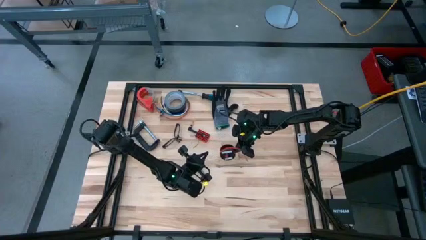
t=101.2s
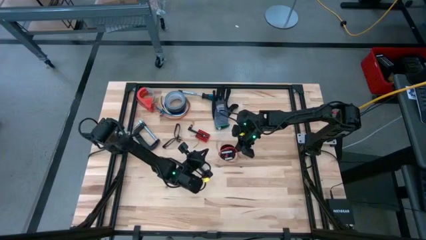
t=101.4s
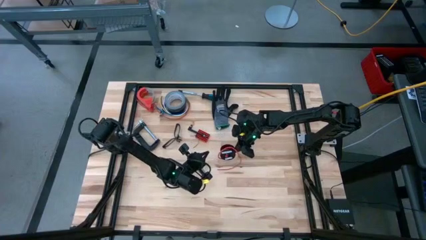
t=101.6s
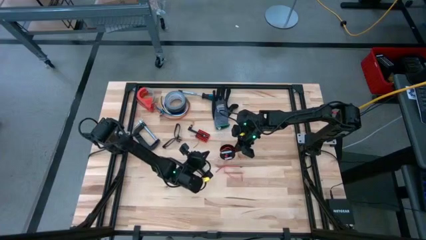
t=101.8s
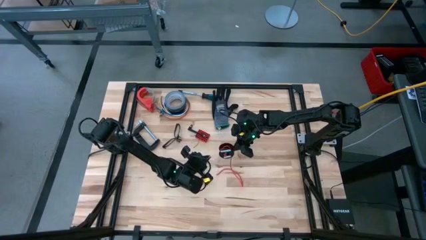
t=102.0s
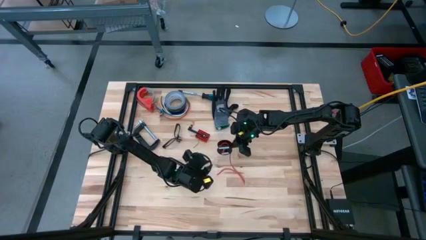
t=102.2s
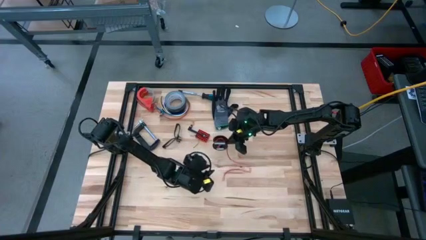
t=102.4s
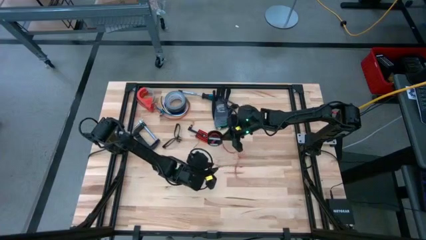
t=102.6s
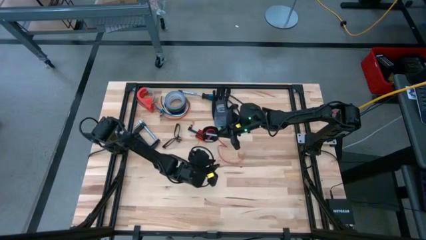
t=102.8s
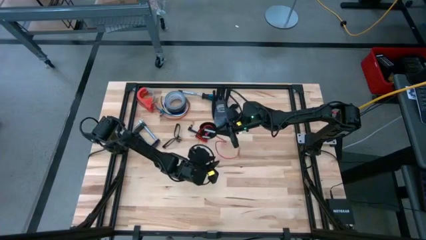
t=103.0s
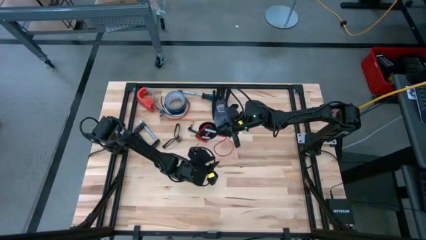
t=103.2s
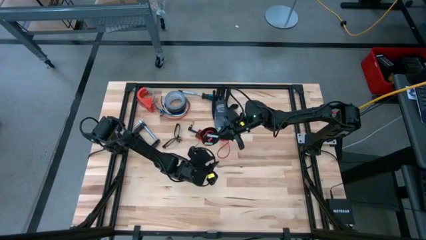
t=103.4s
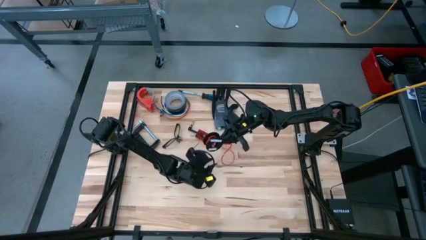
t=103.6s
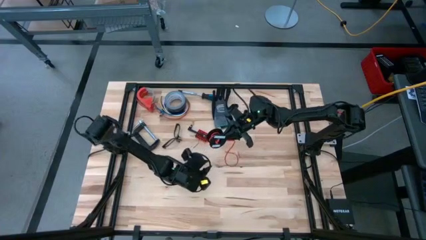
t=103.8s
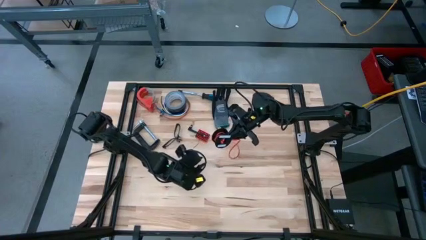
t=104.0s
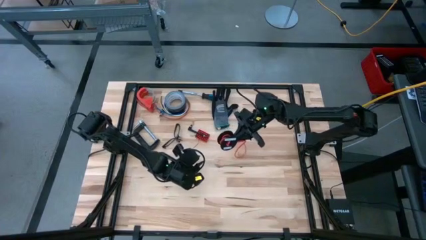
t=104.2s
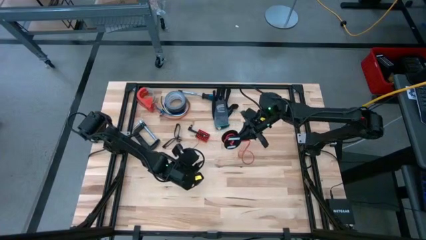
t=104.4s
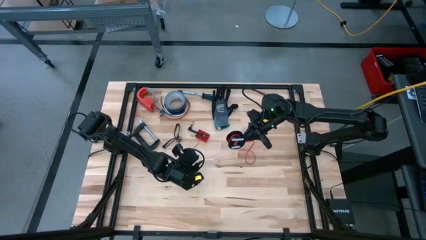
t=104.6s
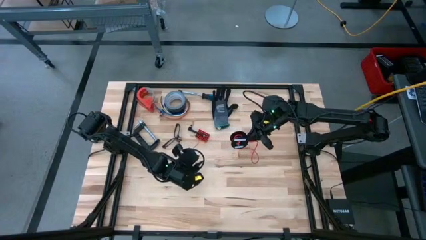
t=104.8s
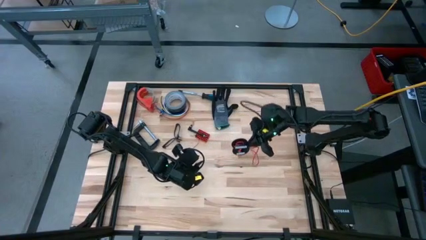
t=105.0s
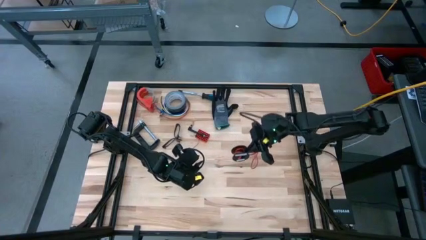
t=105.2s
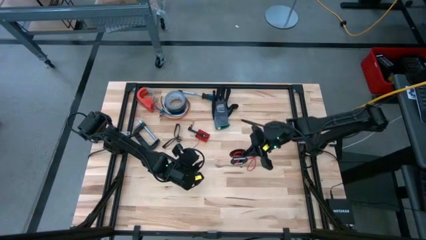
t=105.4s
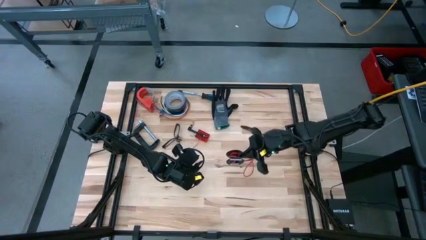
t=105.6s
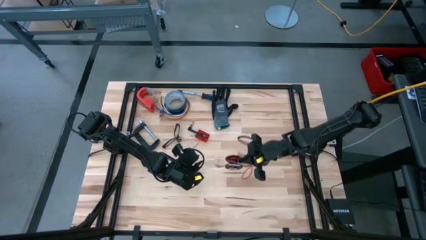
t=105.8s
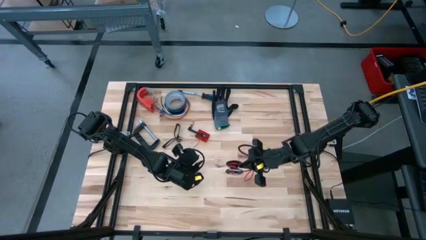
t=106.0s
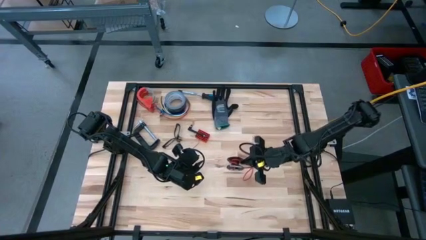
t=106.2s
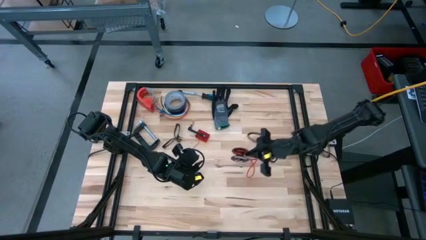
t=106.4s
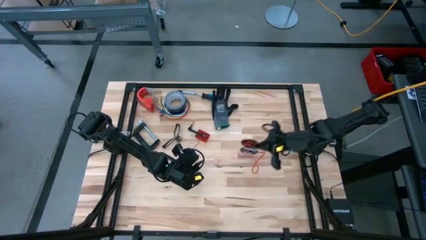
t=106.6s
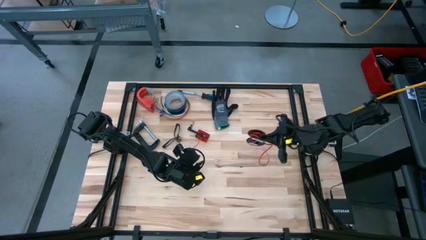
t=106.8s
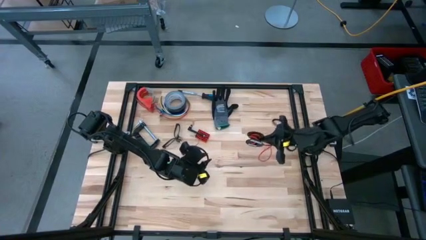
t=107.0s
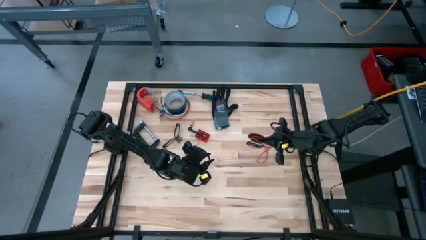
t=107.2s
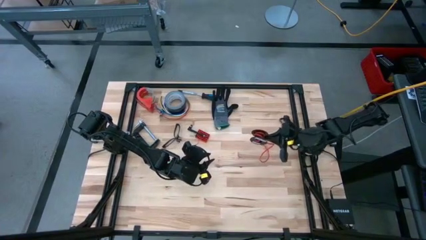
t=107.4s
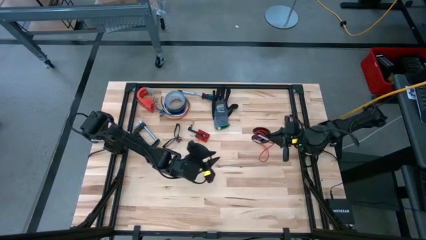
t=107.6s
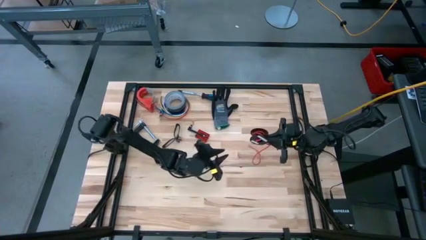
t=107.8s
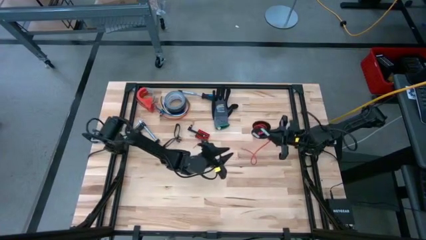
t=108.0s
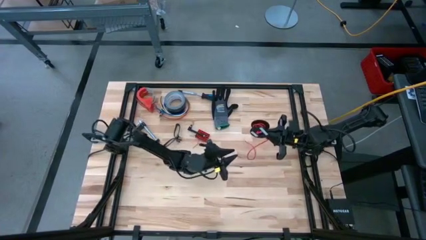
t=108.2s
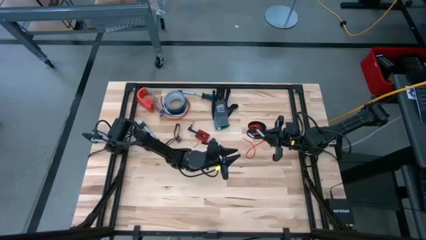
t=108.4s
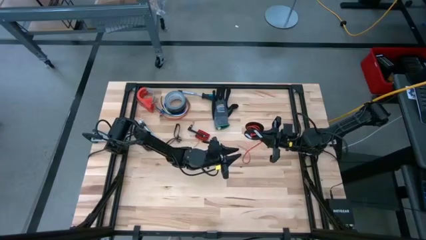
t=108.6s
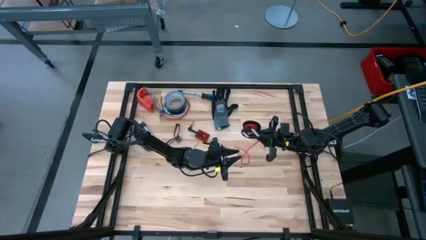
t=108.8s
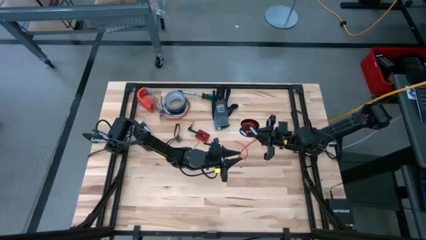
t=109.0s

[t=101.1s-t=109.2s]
Task: Coil cords
Coil the orange wire into the black spool

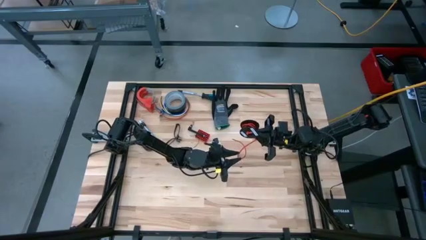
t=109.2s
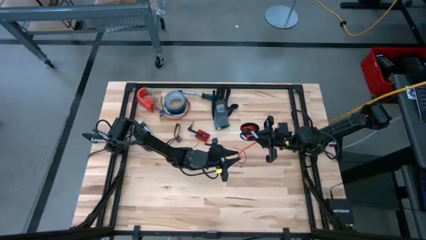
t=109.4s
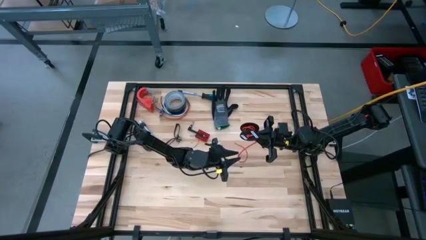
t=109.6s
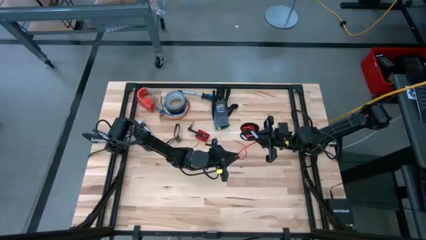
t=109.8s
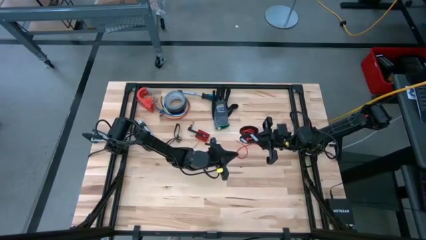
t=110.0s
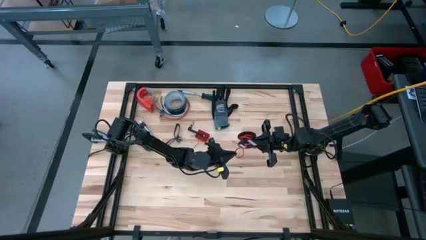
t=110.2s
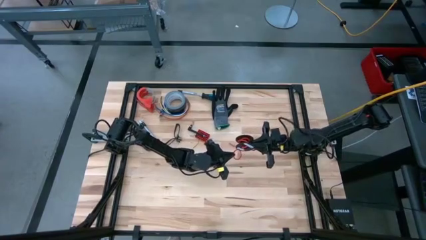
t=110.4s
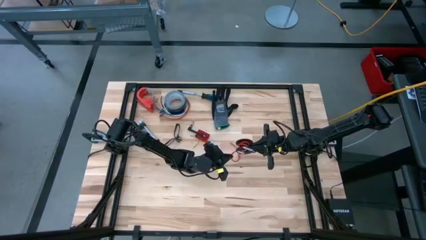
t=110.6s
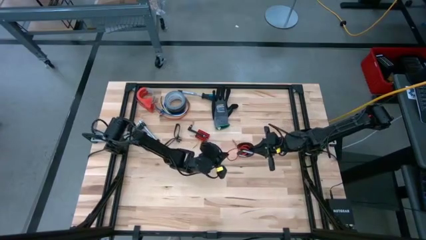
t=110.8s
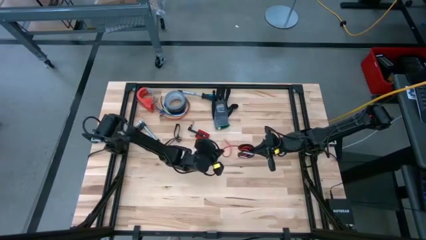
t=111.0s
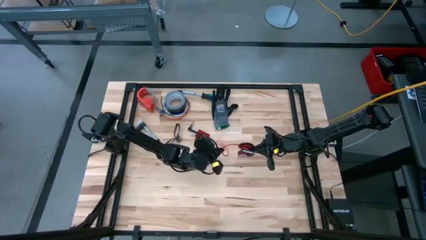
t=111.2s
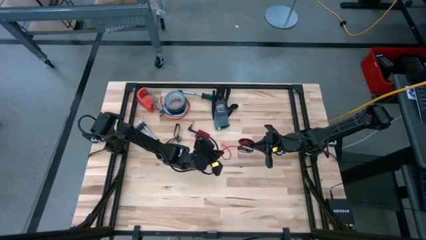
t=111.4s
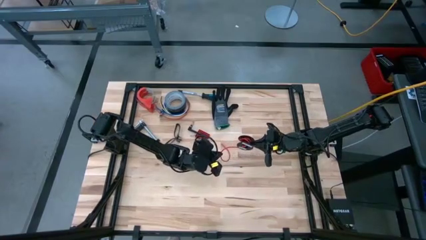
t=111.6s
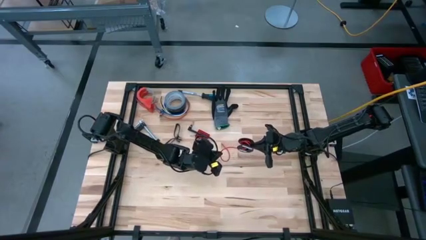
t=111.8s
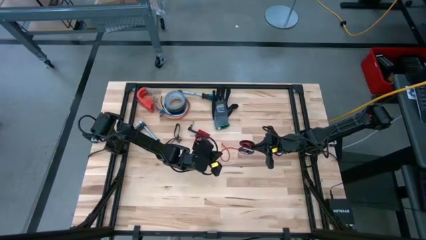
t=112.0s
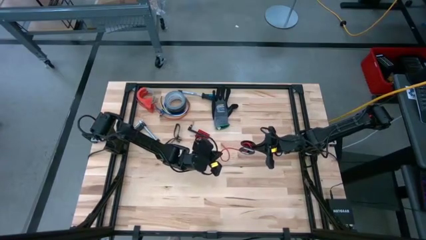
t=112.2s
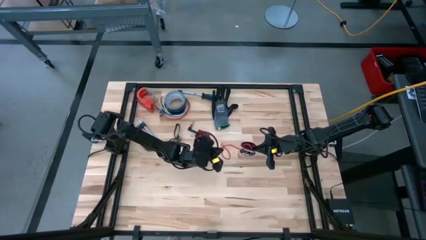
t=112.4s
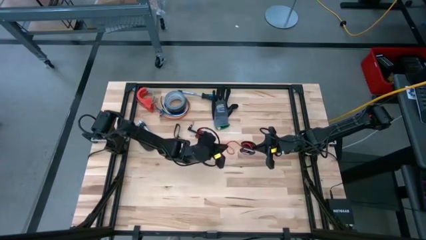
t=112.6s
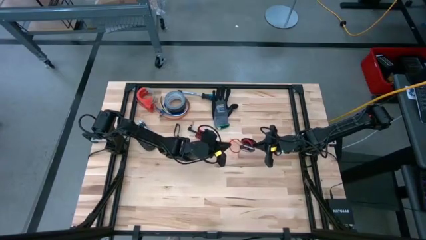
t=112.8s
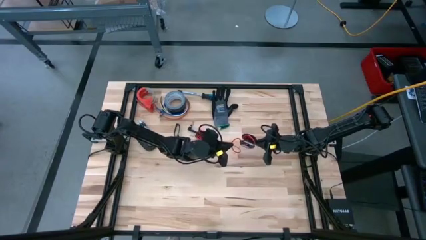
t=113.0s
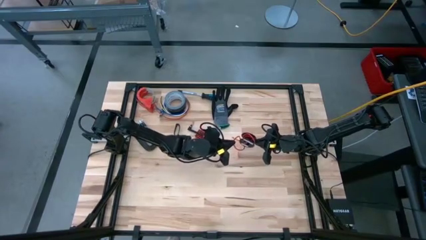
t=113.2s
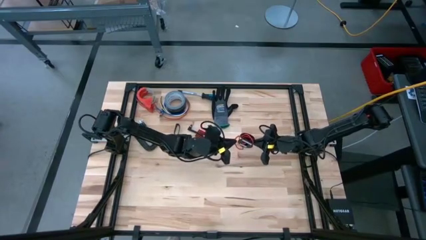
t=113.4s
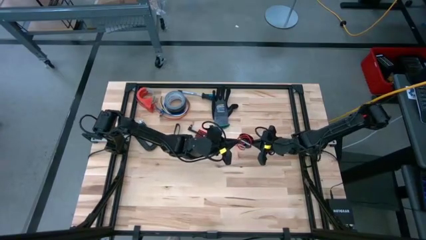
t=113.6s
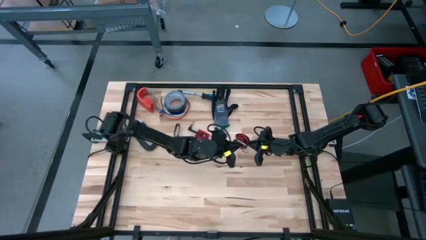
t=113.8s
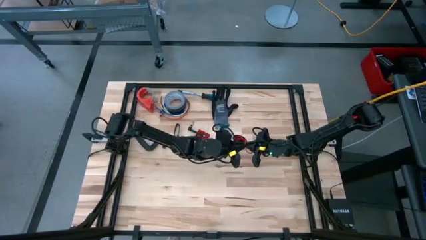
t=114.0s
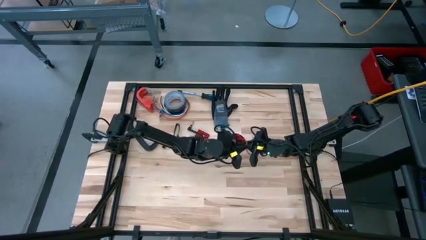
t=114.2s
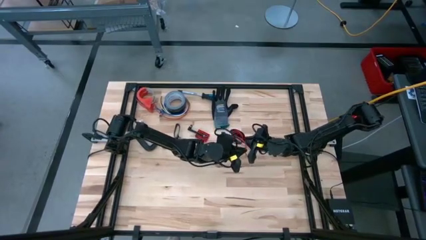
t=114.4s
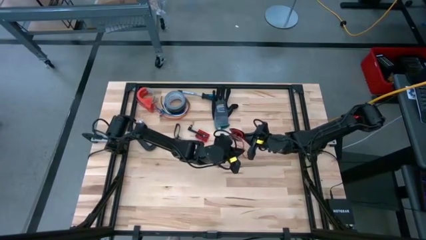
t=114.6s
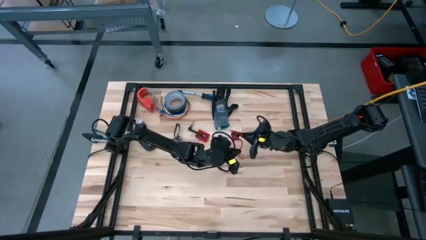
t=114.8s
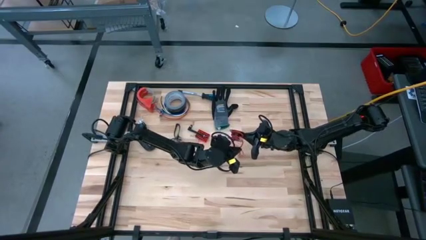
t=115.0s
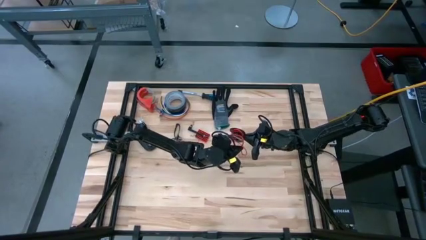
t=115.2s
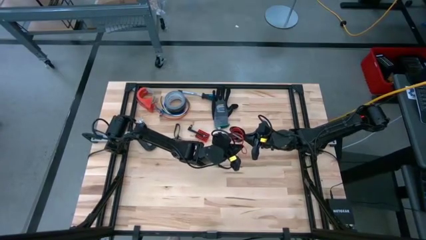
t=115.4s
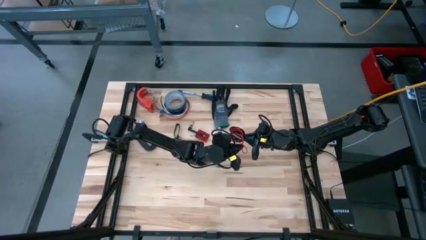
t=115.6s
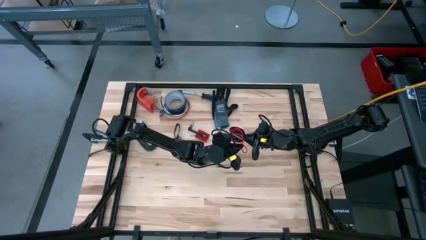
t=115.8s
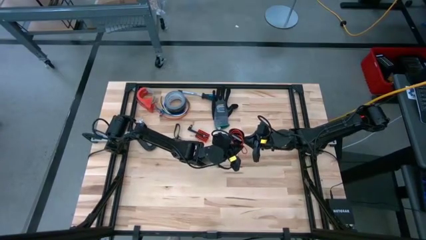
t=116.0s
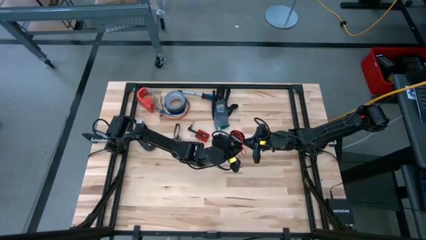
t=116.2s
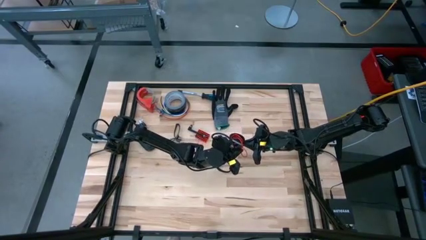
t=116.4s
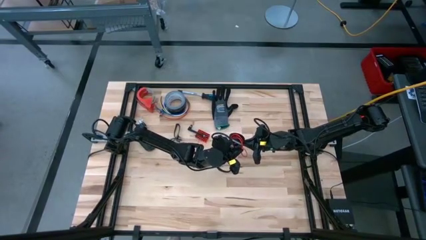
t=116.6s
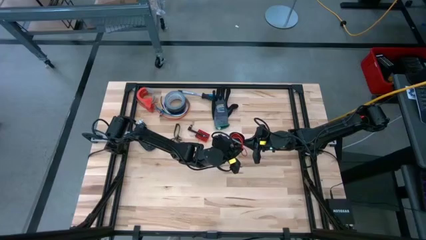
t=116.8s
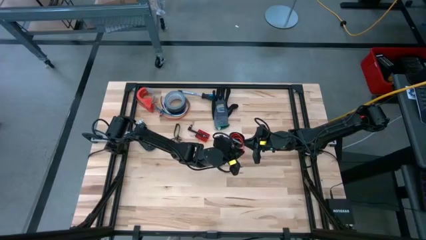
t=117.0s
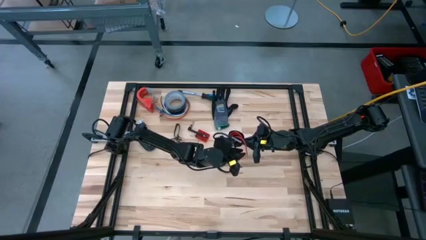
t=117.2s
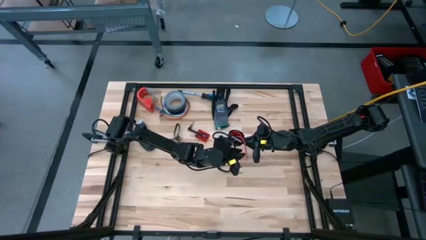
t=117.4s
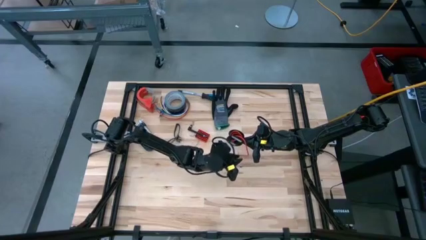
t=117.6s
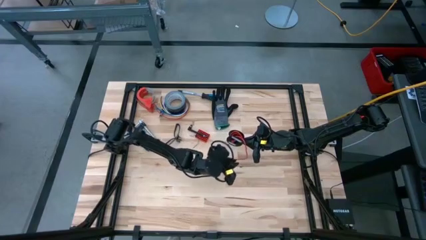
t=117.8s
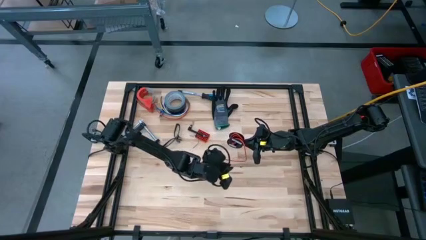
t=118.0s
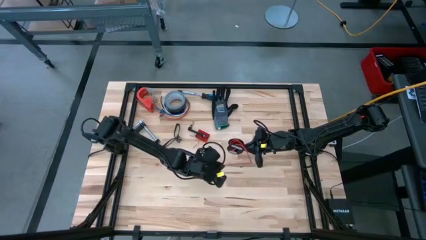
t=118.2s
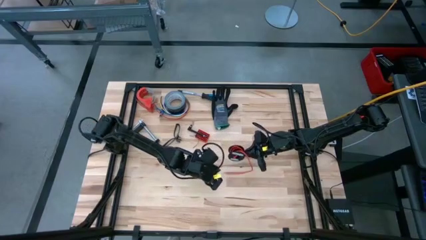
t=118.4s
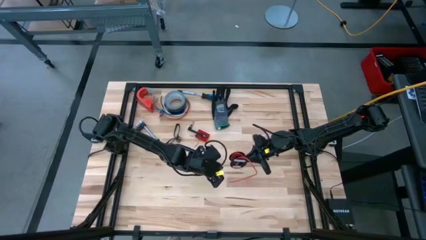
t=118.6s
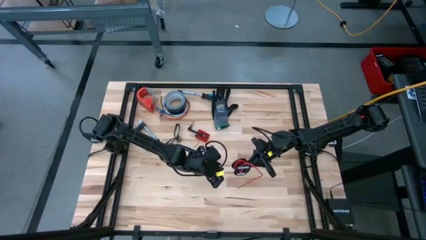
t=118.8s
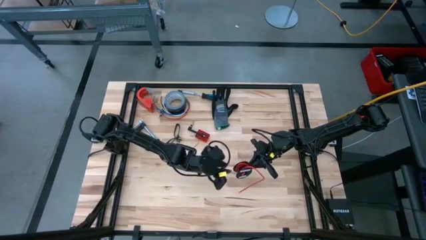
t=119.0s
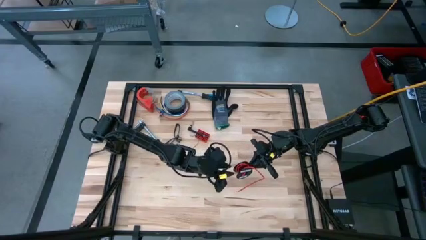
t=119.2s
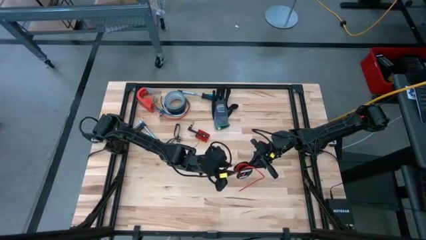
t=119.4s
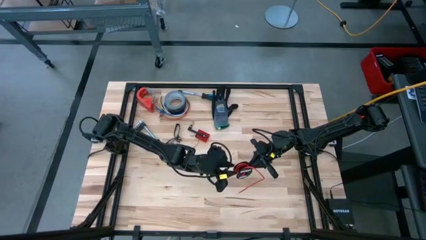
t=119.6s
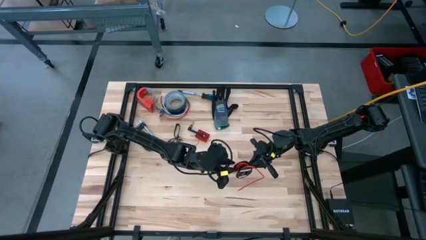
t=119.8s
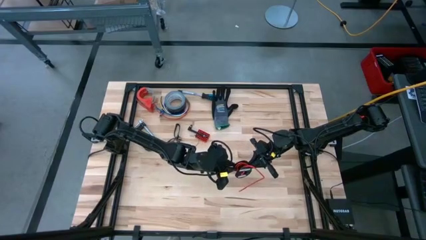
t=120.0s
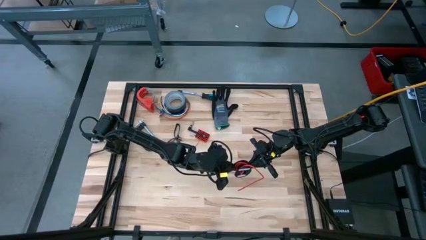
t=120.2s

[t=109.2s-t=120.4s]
Coil the orange wire into the black spool
